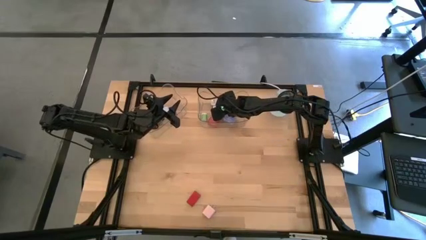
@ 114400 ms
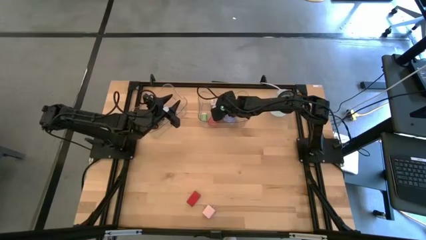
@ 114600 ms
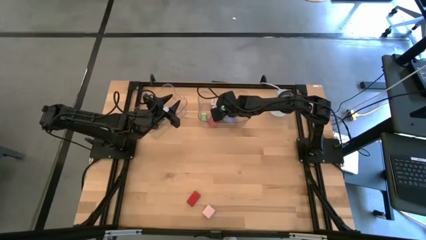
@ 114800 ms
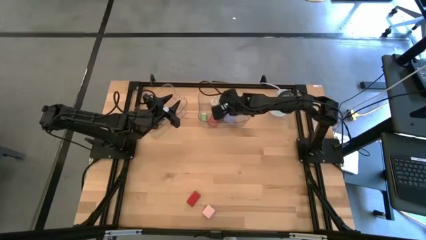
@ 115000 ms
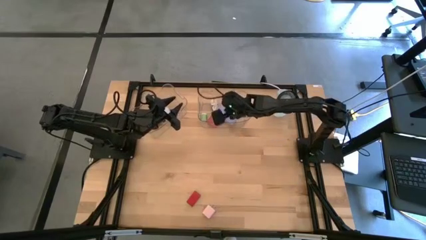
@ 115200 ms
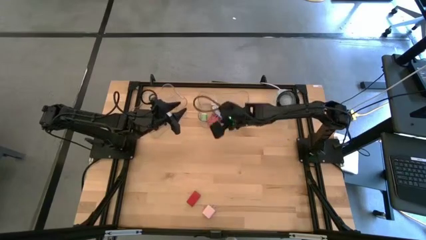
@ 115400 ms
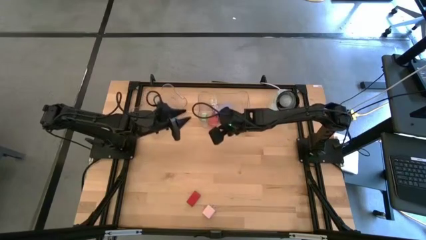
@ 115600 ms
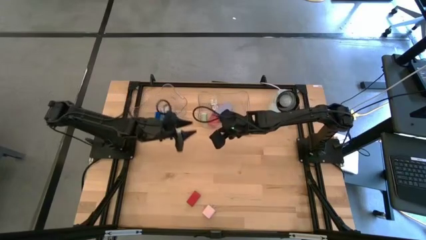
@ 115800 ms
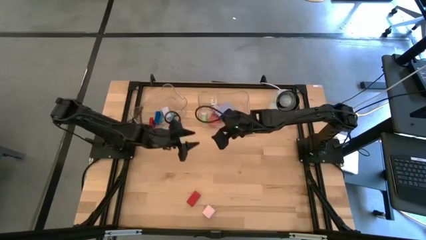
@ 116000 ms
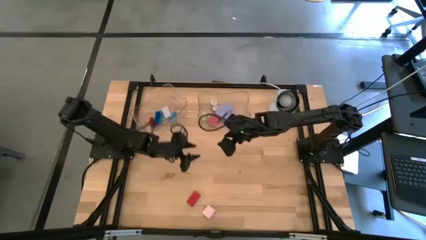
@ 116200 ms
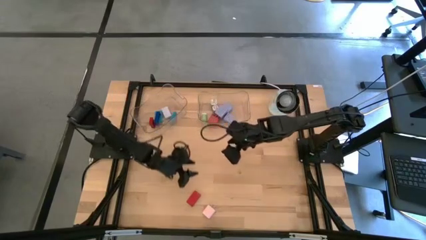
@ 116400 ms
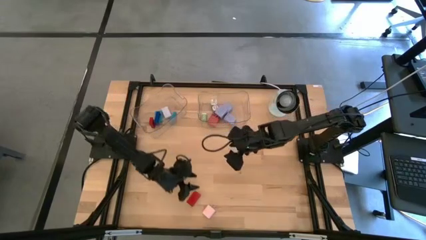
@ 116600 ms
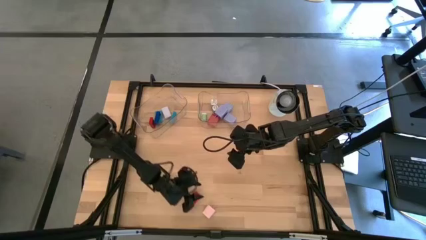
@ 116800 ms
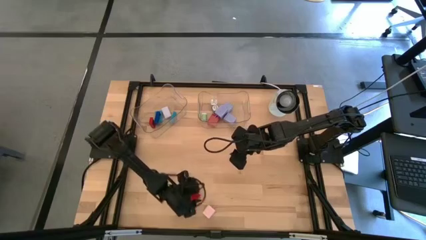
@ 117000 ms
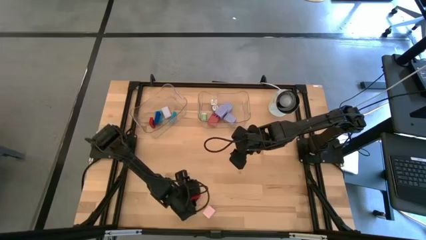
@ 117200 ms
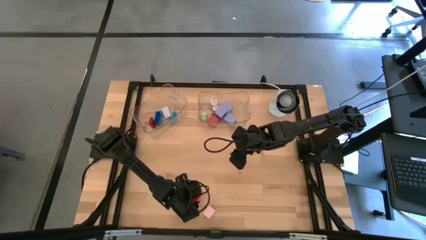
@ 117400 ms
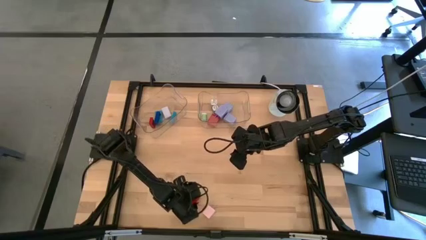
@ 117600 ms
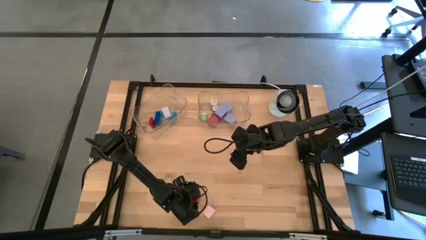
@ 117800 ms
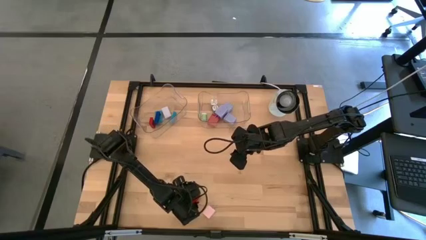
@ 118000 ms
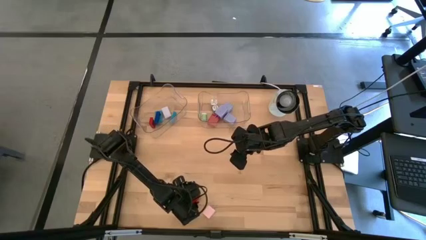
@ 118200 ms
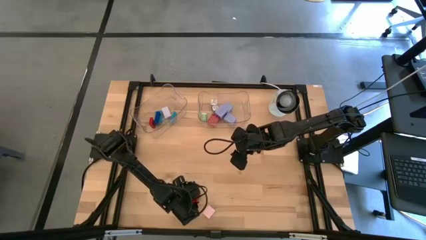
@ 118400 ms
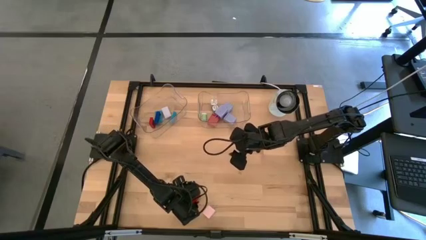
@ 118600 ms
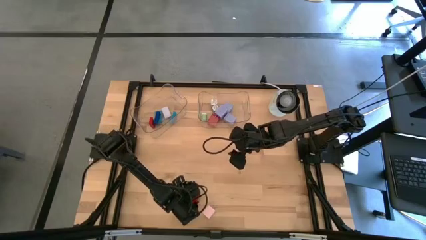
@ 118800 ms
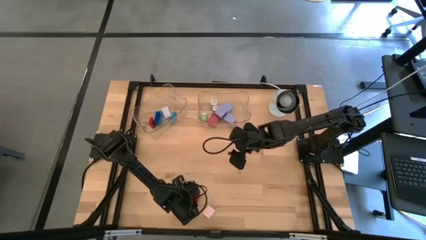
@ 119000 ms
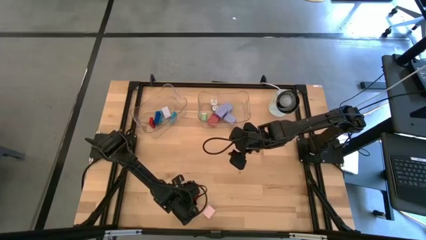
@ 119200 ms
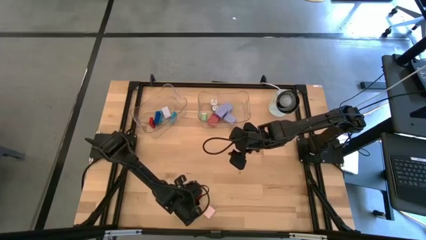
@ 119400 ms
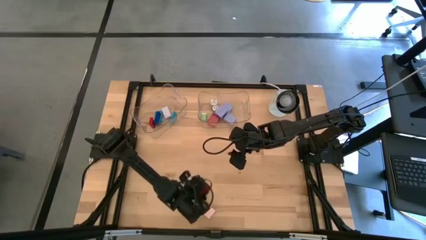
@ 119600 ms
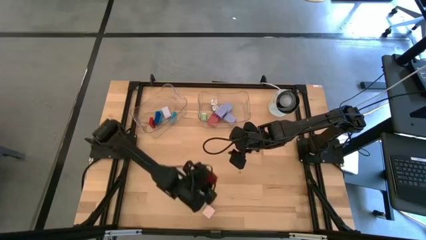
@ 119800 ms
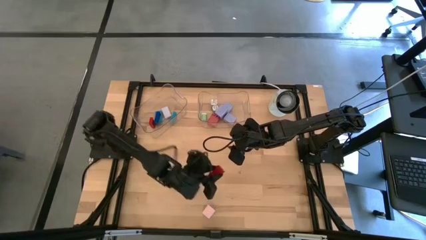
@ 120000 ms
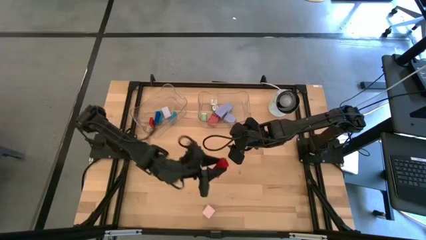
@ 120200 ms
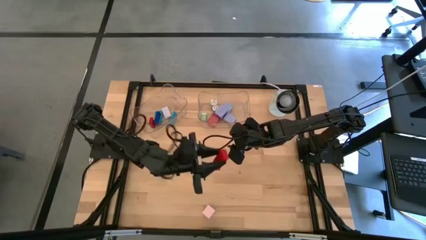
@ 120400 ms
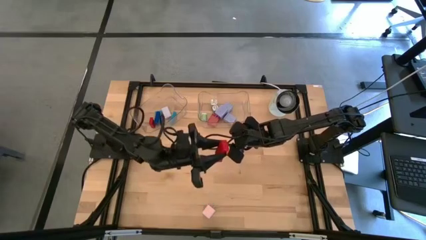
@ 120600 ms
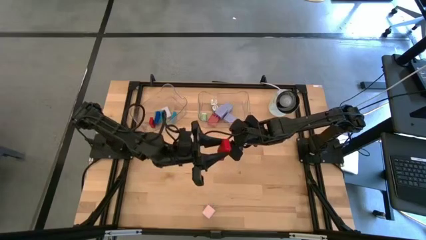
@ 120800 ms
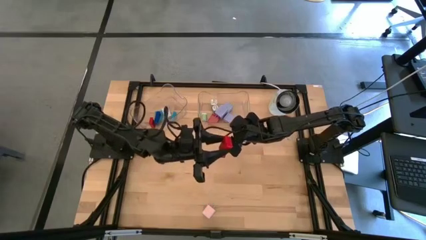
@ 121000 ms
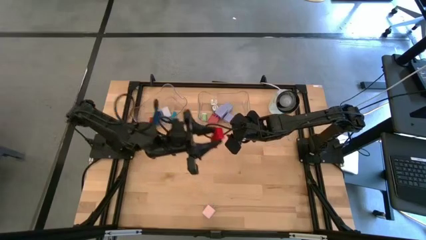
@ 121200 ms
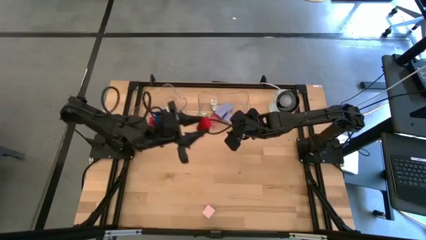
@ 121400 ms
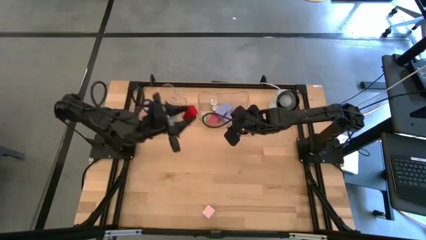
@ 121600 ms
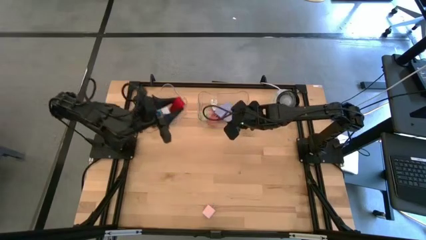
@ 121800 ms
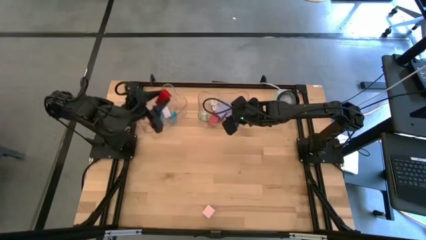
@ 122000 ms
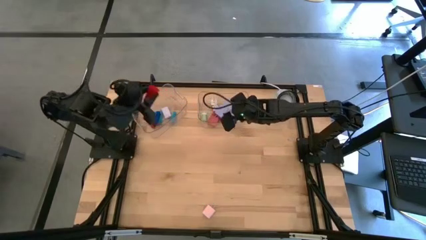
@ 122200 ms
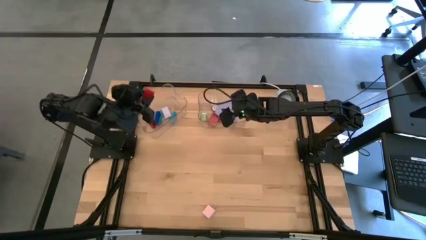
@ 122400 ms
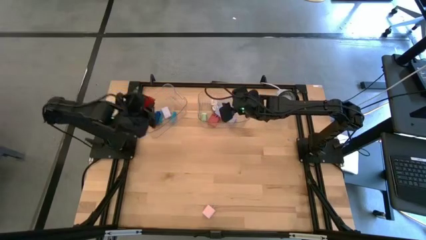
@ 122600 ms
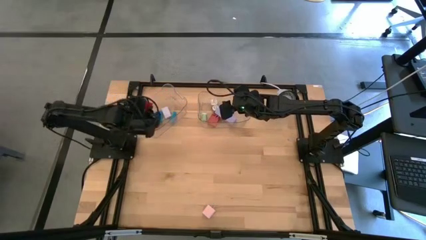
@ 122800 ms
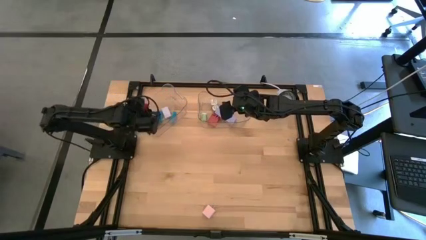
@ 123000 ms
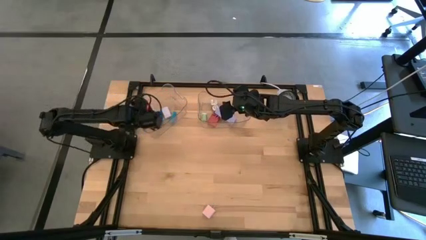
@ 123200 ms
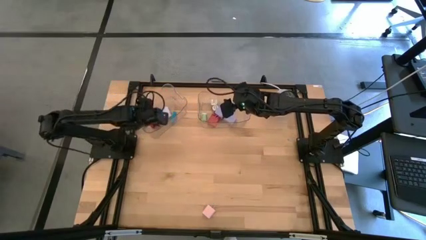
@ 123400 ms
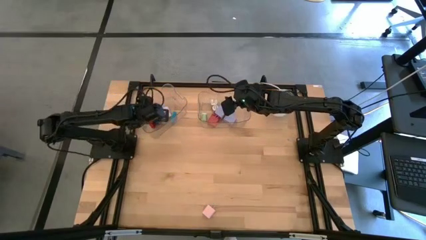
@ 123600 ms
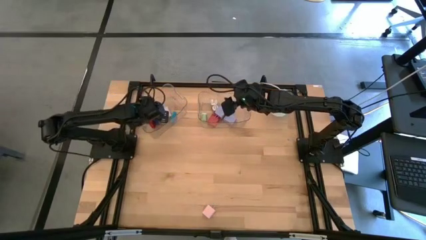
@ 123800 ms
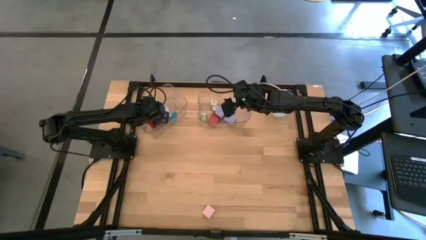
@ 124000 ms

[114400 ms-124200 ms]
Task: Pick & Place Office items
Put the red digital timer into the left transparent bin

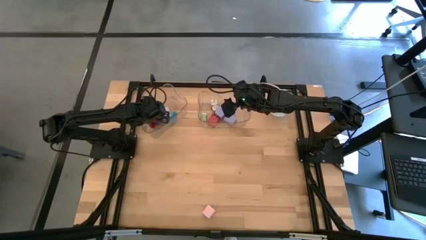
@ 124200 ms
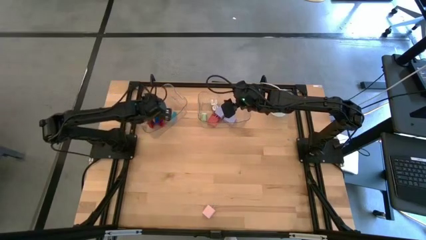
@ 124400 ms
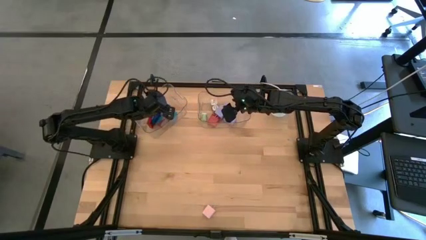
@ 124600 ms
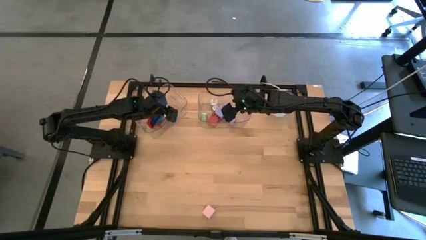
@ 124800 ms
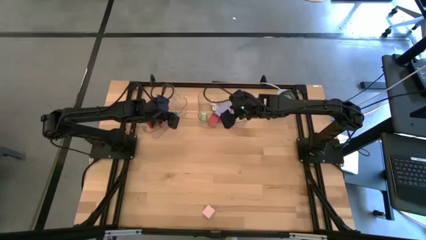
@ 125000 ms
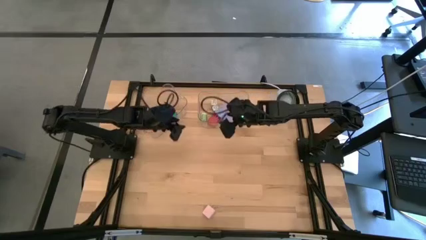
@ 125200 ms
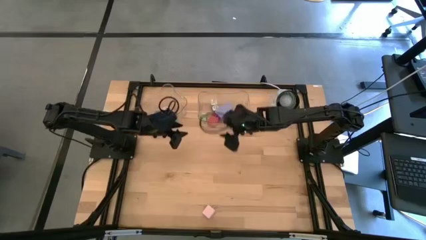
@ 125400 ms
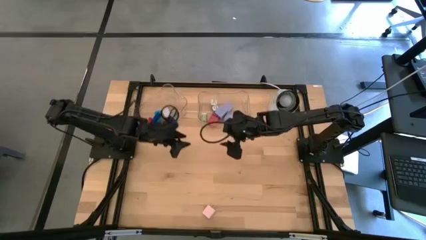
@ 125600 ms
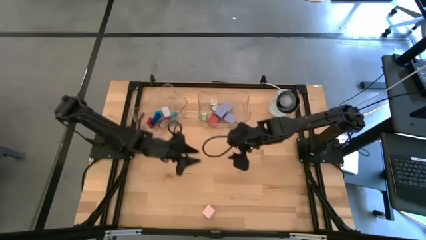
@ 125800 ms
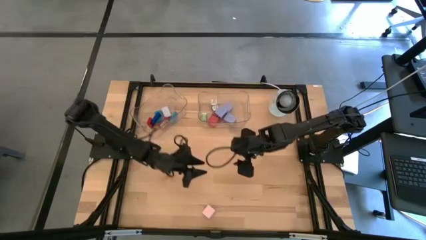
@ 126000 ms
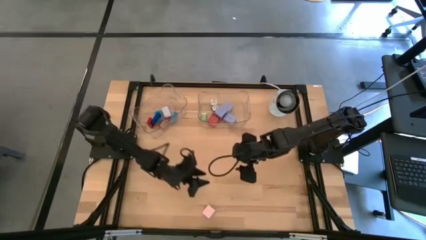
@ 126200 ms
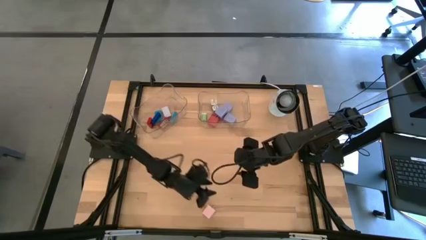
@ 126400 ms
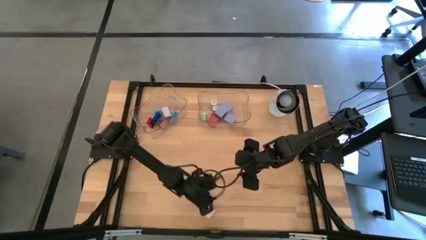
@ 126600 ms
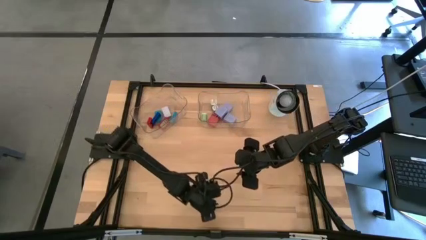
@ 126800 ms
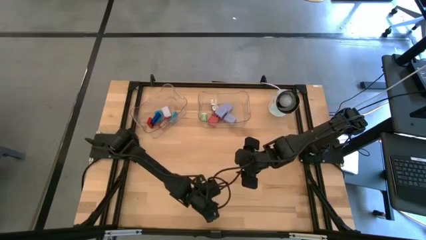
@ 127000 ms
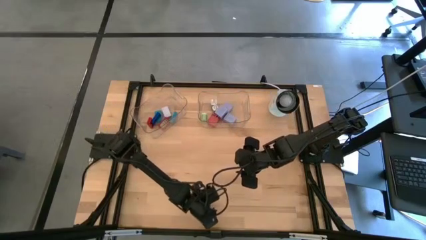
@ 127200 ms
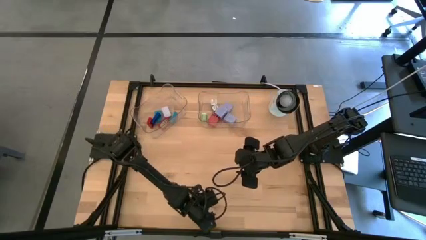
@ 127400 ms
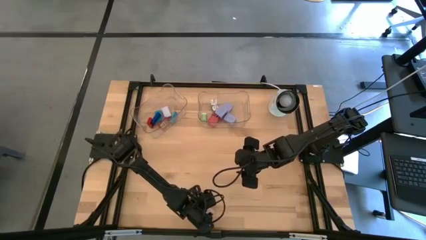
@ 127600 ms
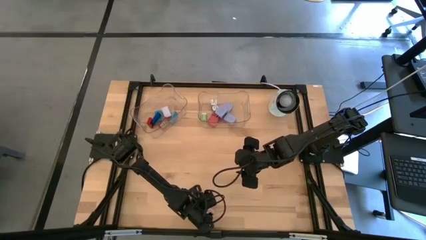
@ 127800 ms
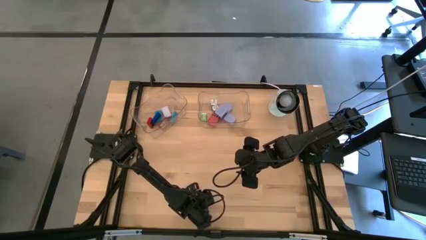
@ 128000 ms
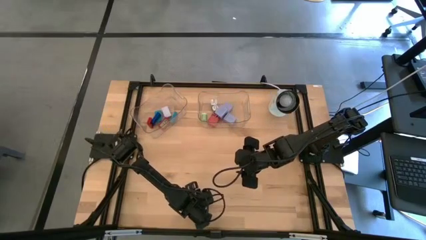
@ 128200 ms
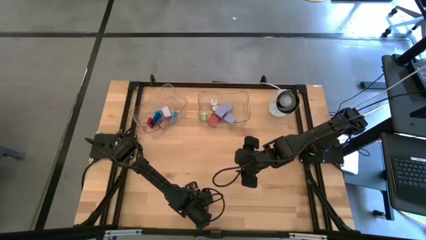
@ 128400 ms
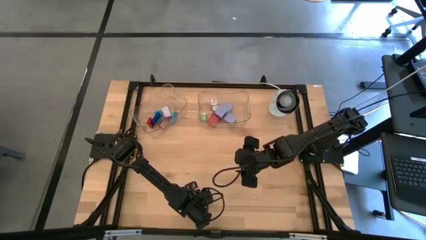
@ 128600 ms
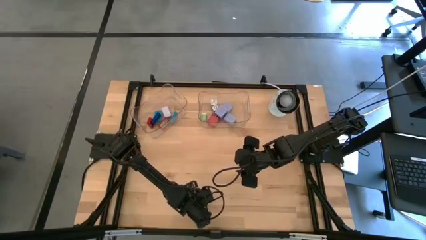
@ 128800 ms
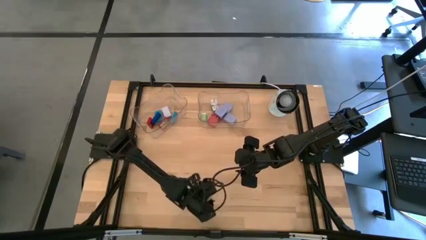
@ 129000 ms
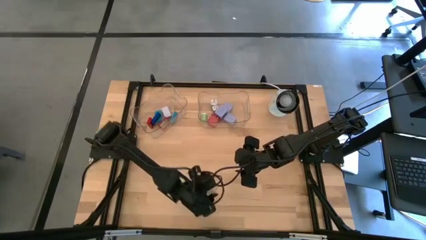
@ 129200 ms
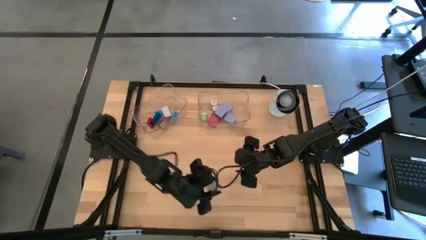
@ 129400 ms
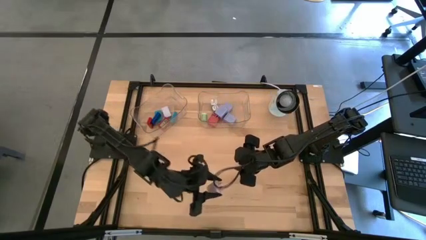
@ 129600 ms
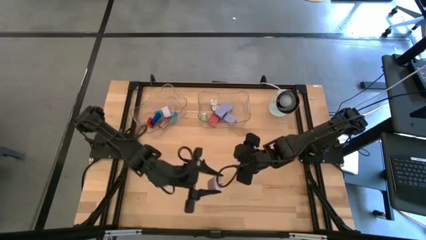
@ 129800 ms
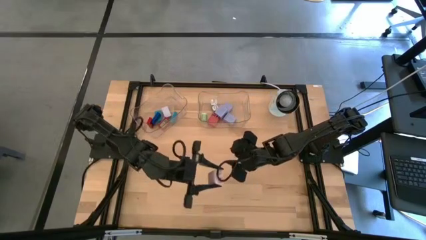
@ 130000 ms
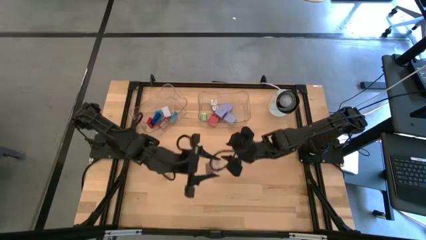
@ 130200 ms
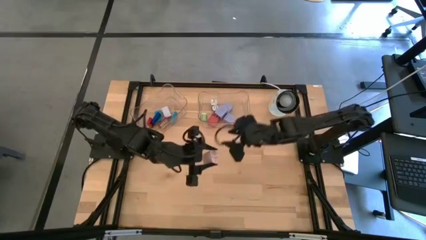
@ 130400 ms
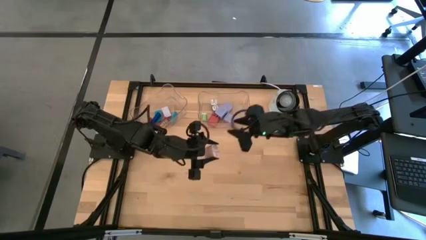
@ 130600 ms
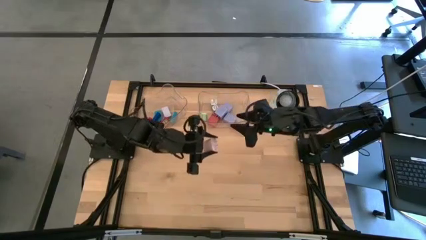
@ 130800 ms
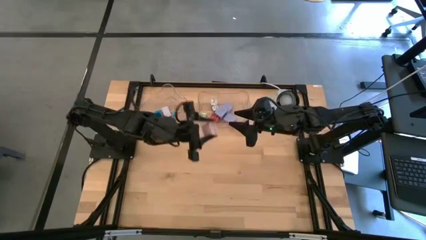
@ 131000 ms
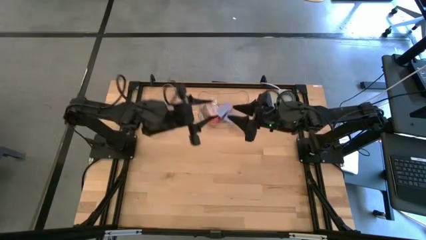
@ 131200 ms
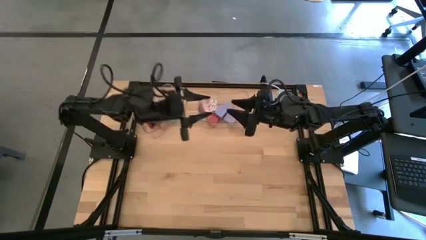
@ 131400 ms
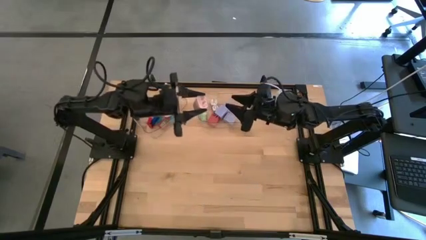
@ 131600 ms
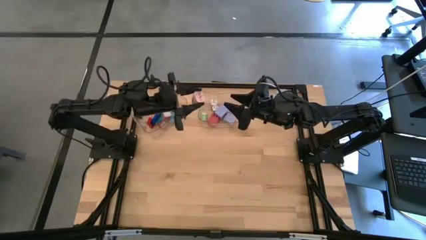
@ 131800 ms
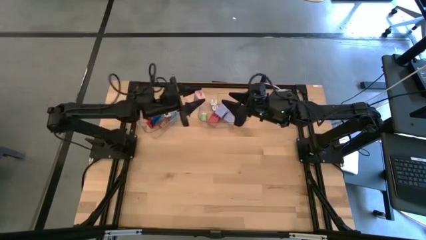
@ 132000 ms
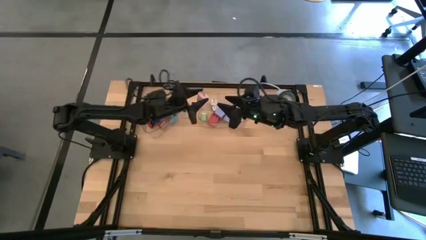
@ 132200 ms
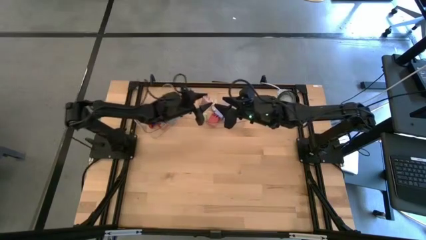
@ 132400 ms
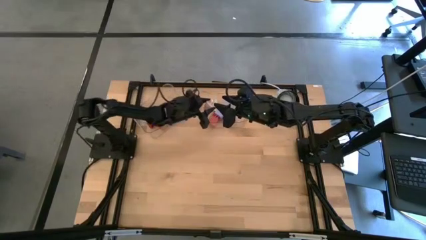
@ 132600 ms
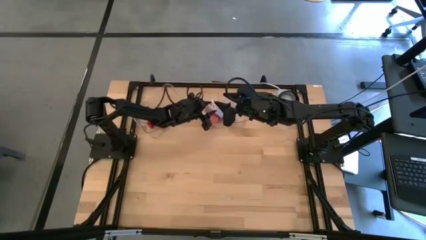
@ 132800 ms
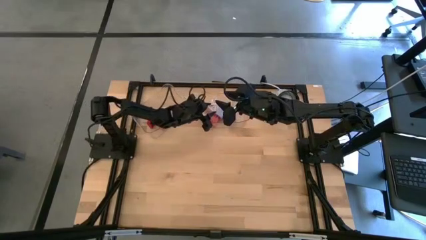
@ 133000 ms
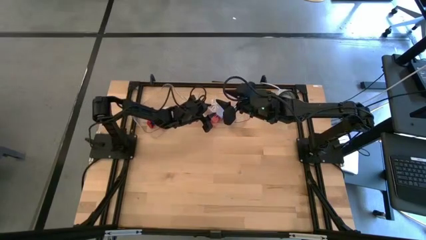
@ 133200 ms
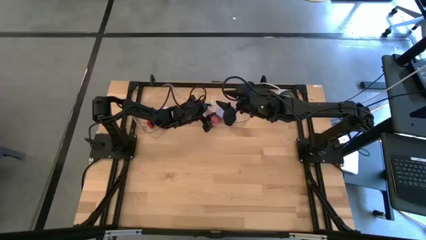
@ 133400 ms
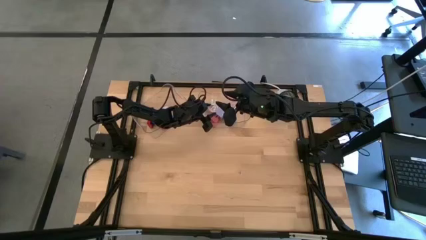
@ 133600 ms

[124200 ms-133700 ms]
Put the pink charger adapter into the right transparent bin
